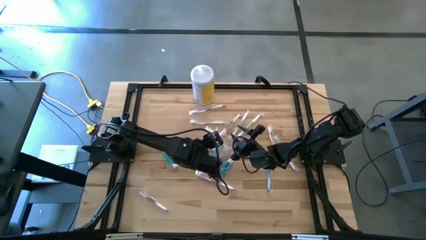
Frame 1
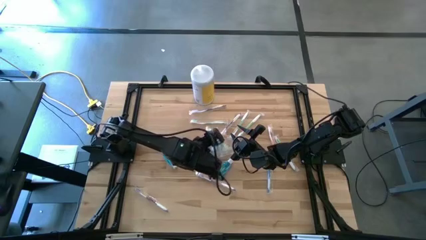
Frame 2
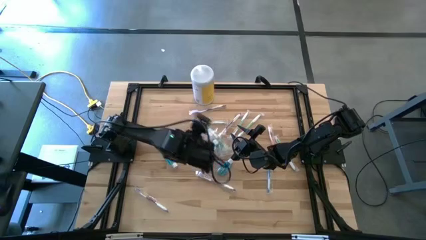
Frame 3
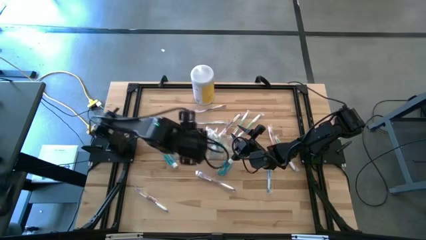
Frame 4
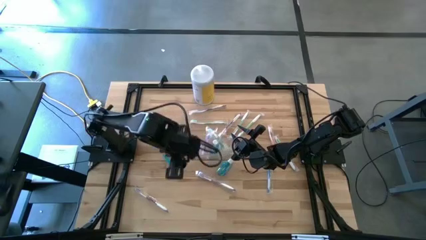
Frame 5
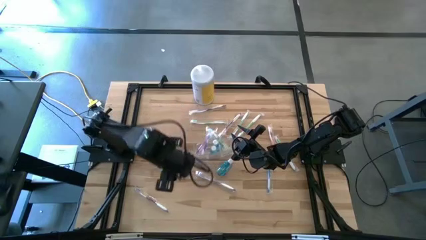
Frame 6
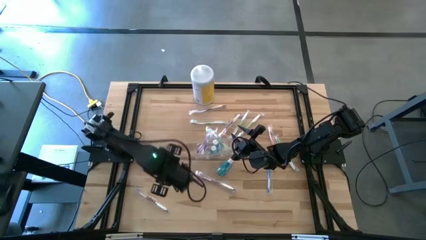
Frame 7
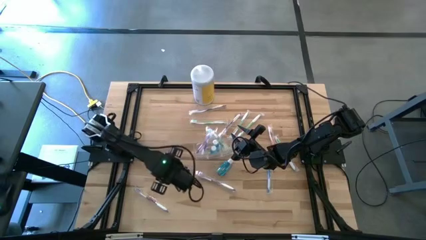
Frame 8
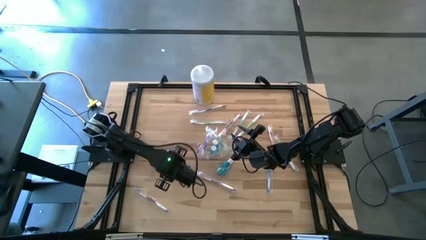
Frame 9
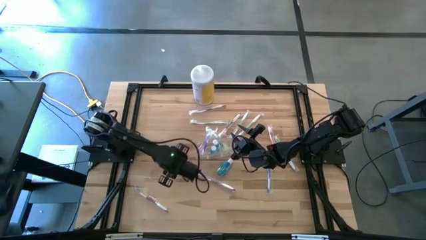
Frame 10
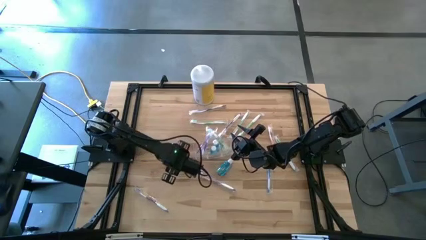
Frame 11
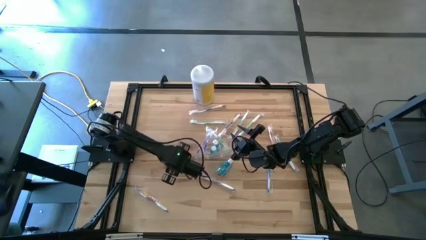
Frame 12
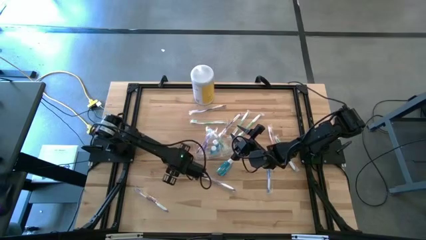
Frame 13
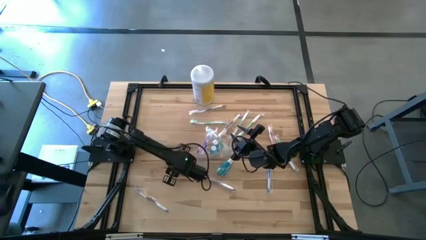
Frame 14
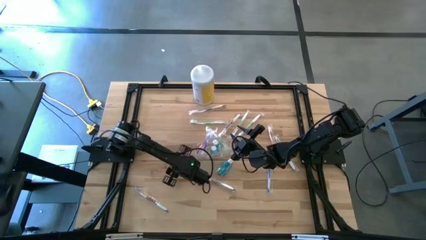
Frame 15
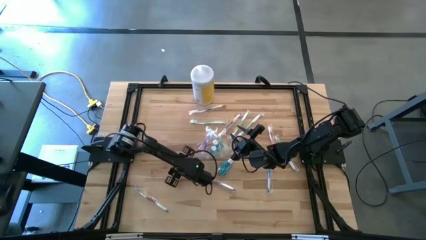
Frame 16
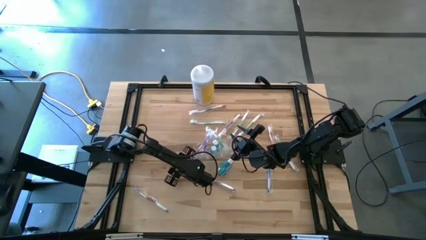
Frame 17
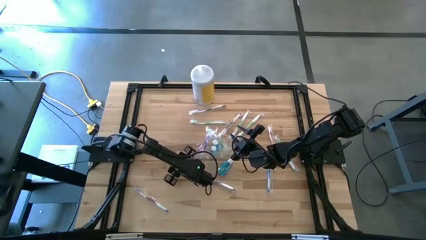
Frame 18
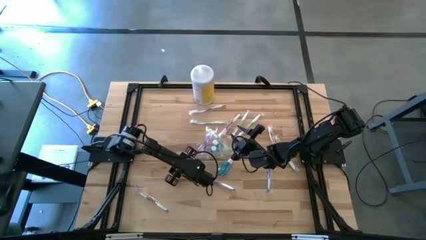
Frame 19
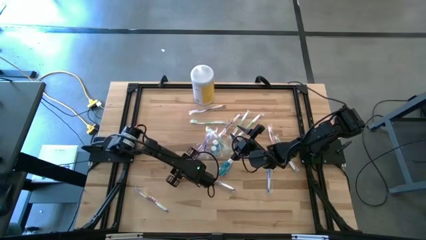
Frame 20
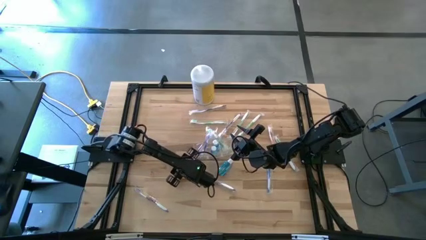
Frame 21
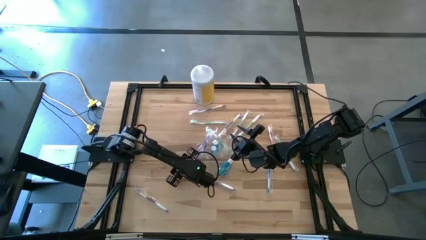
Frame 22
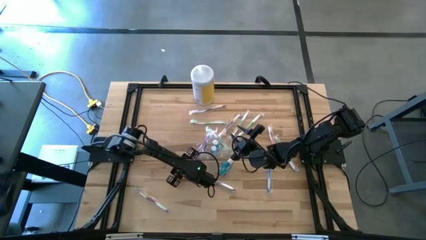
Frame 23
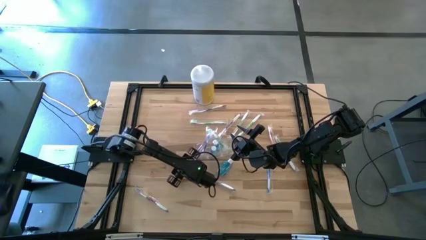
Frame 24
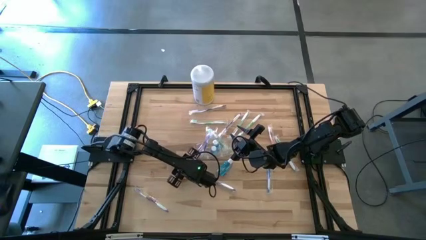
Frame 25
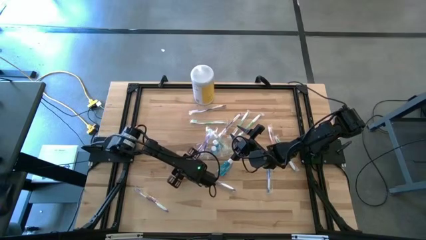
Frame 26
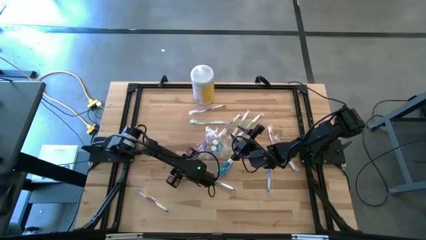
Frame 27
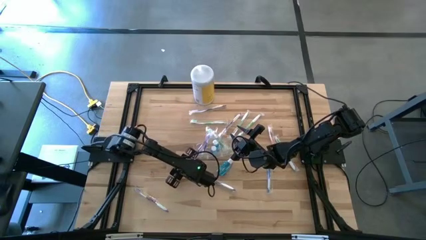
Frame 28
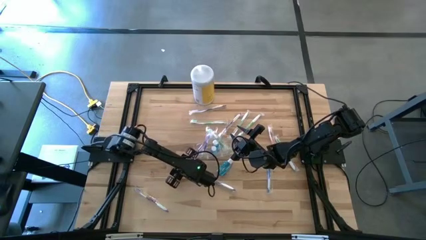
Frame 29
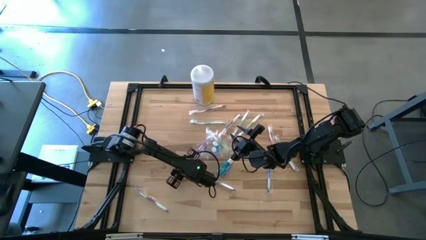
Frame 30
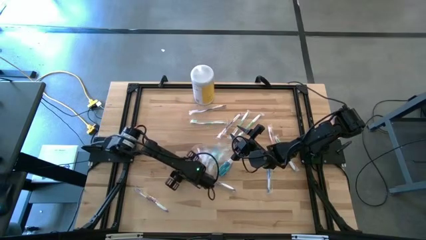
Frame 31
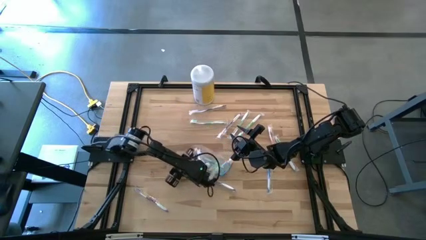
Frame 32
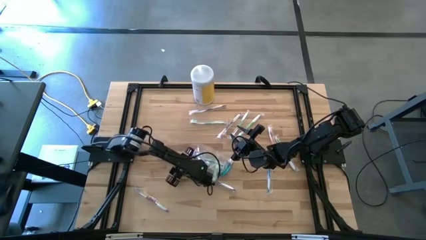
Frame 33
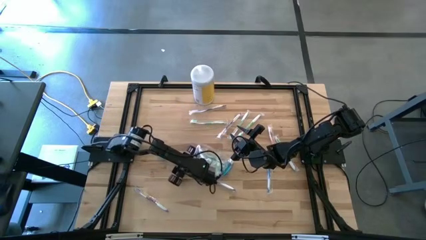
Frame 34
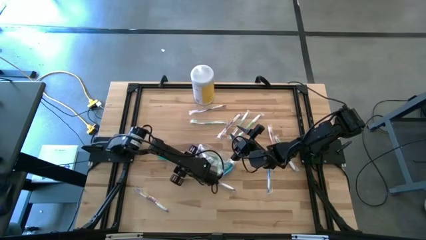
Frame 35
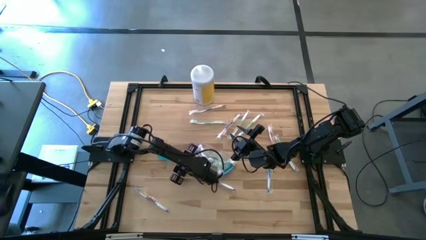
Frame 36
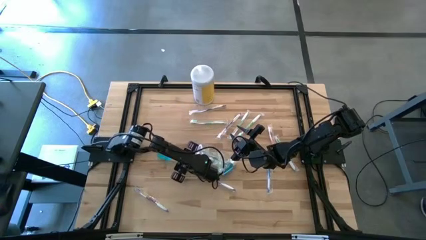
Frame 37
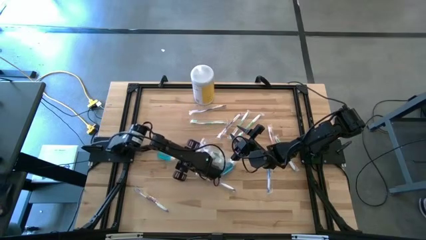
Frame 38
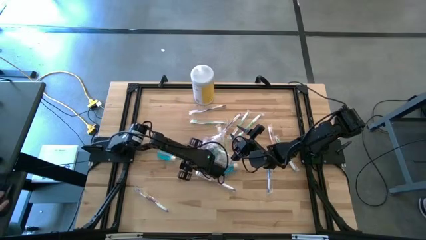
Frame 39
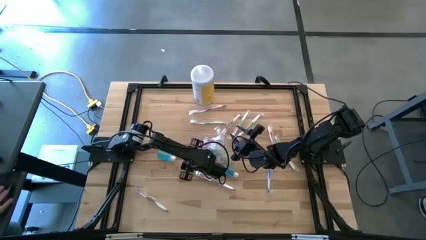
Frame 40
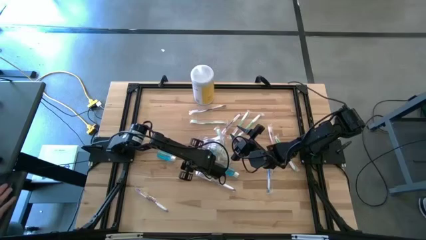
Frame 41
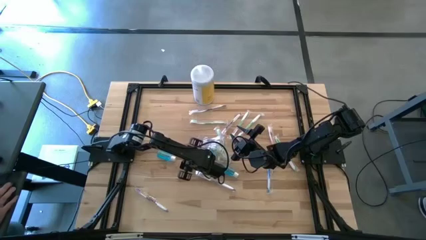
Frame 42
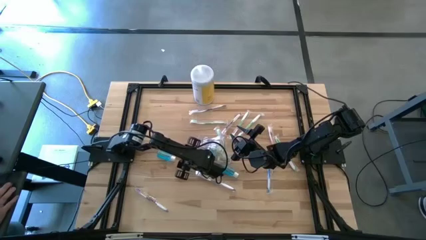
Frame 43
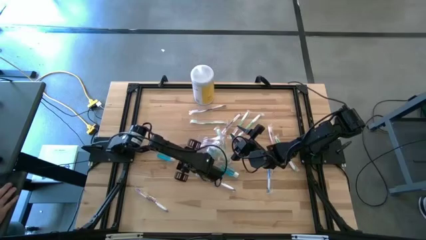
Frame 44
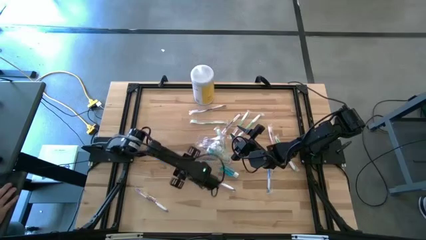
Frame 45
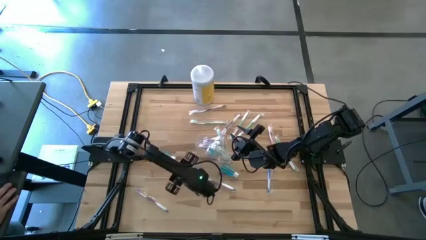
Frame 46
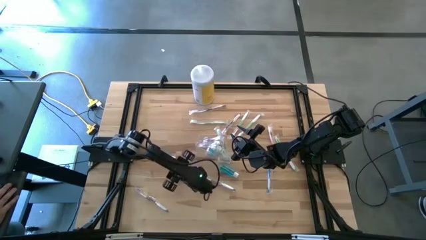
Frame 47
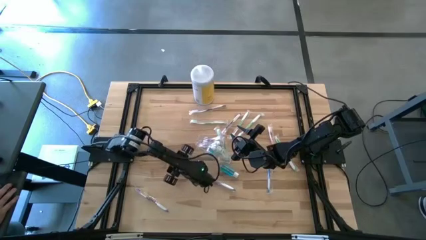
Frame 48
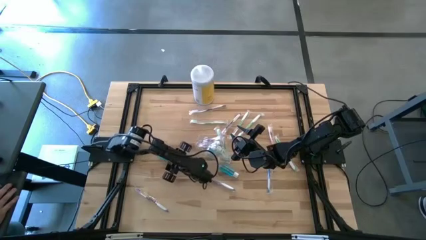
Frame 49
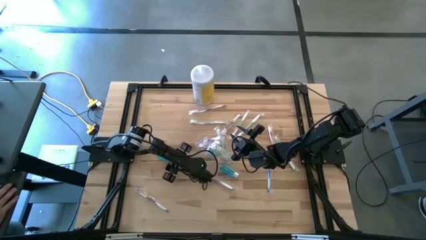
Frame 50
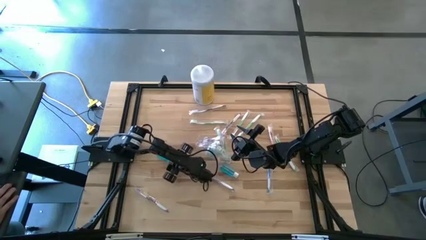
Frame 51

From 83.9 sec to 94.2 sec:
Task: Pick & Place toothbrushing station
Put the mouthwash bottle into the transparent organizer

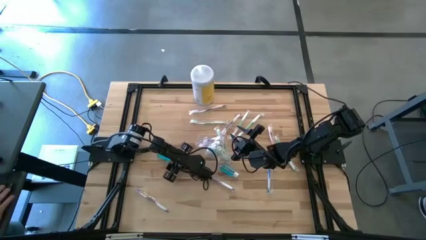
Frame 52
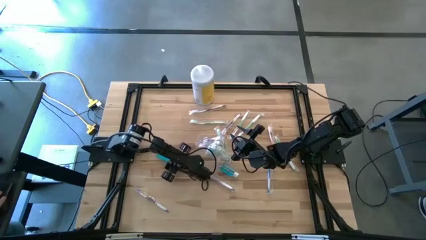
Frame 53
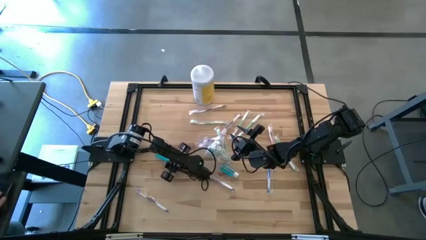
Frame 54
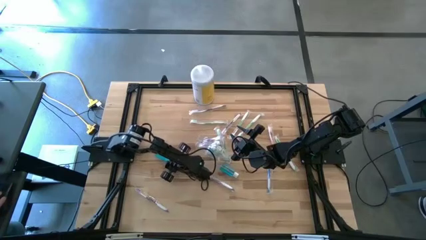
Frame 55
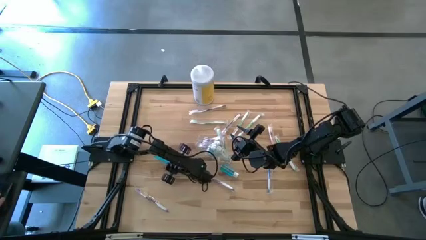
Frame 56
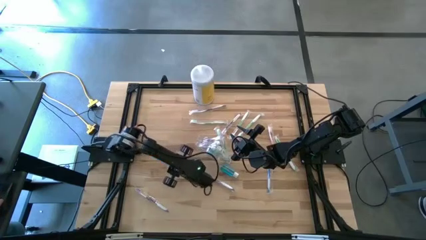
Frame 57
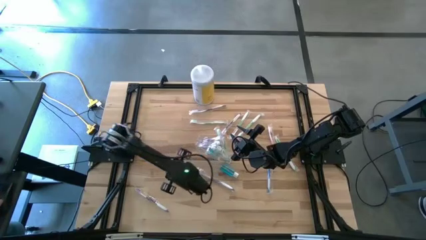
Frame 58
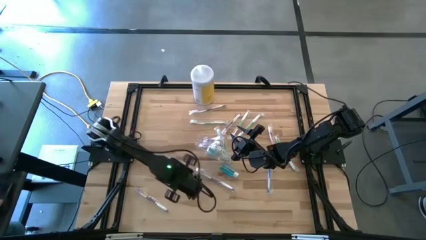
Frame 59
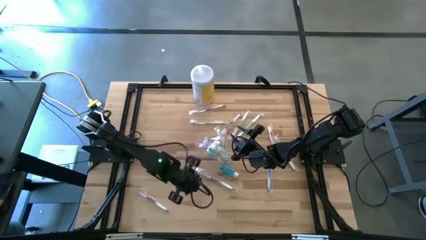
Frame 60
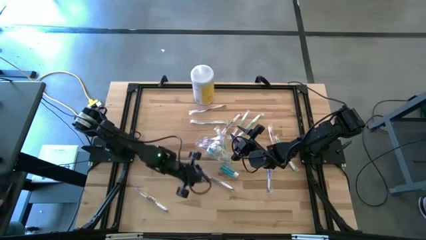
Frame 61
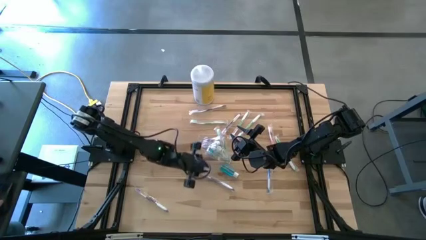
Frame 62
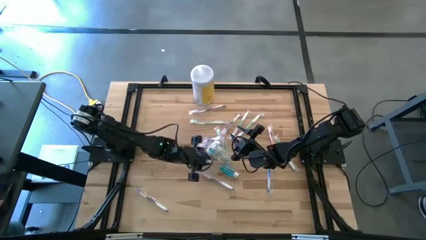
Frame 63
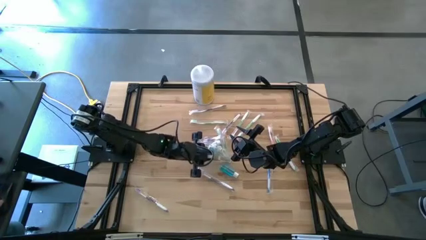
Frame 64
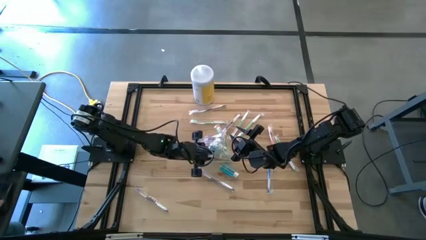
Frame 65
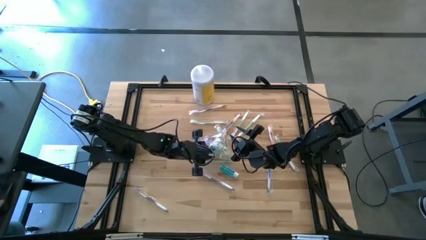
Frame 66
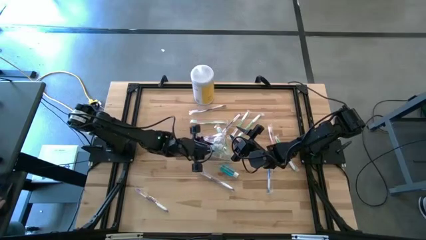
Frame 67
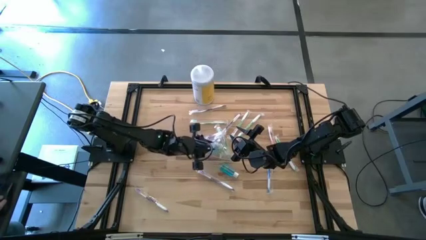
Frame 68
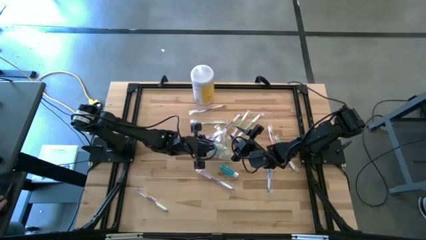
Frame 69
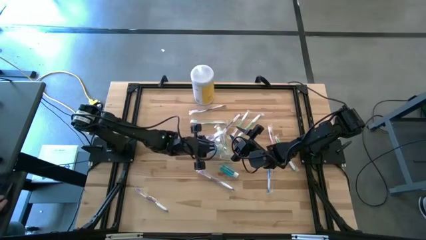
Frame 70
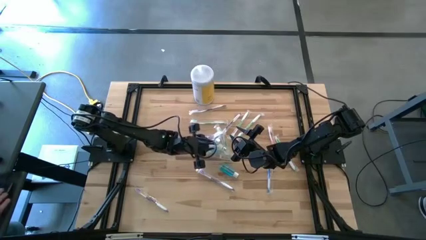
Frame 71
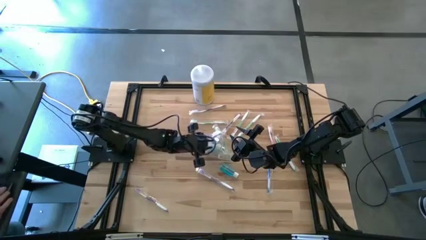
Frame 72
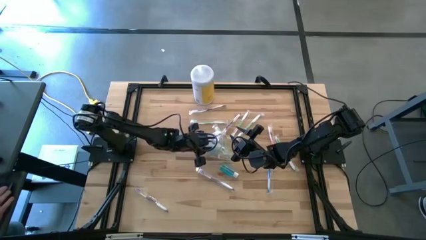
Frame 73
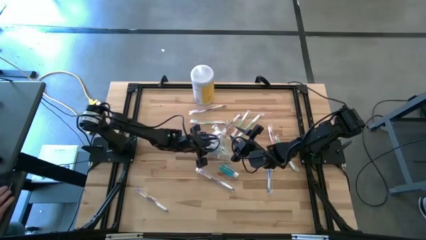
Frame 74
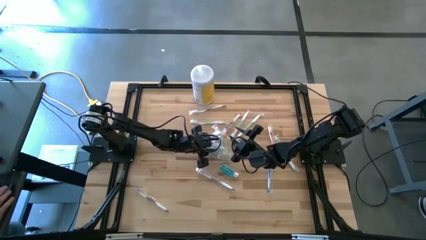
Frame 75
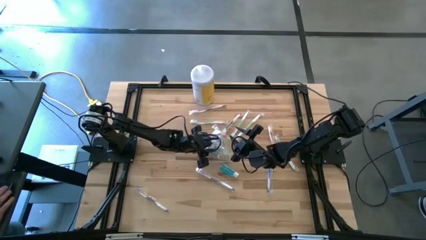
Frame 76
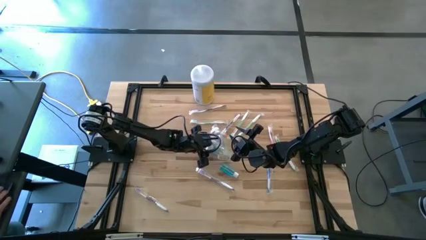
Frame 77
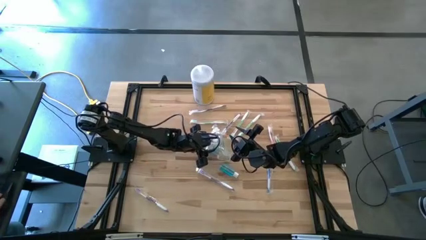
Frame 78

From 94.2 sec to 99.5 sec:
Put the mouthwash bottle into the transparent organizer
